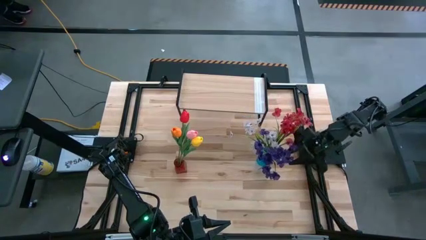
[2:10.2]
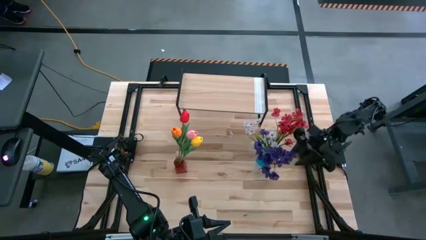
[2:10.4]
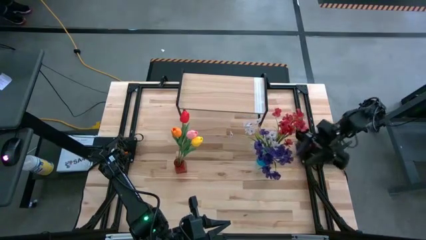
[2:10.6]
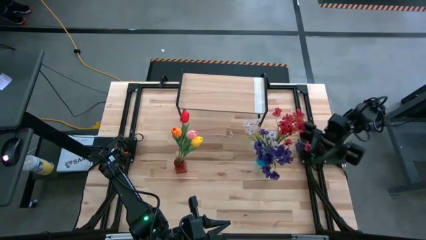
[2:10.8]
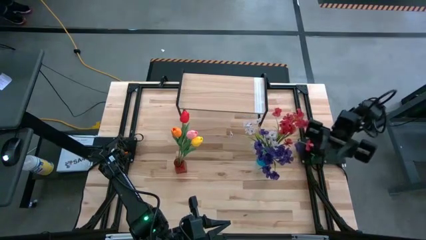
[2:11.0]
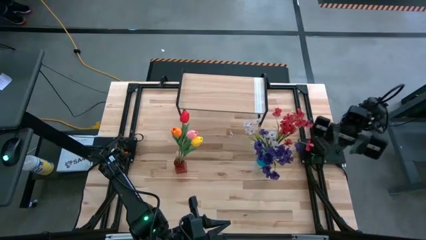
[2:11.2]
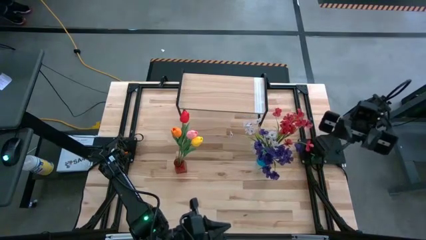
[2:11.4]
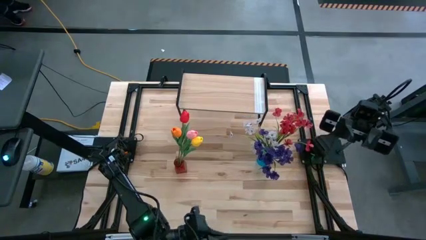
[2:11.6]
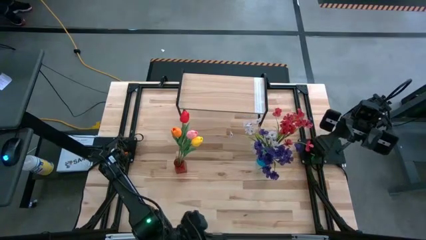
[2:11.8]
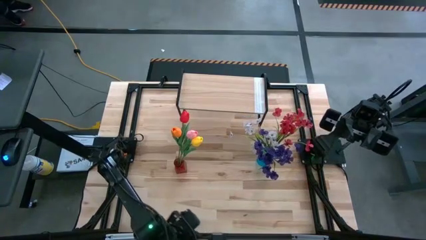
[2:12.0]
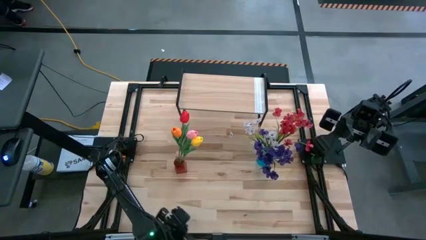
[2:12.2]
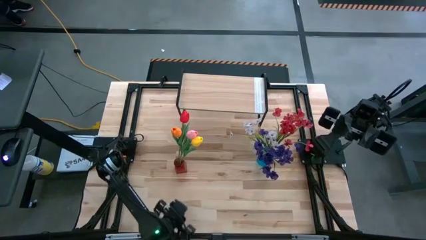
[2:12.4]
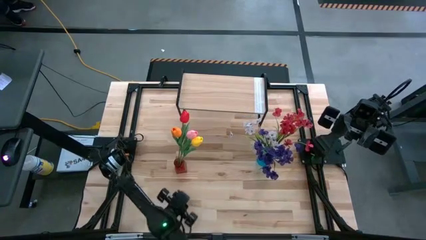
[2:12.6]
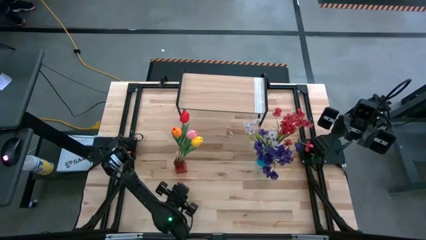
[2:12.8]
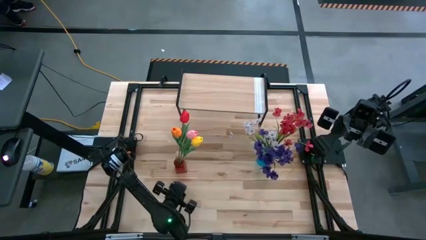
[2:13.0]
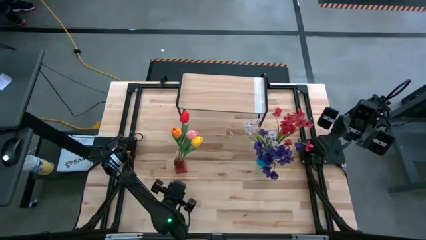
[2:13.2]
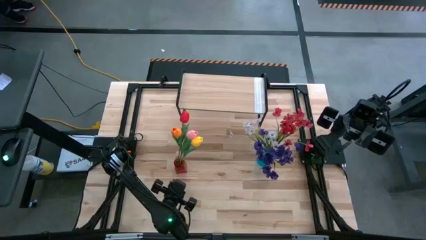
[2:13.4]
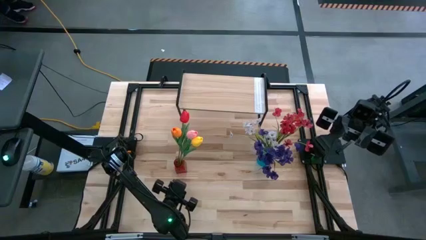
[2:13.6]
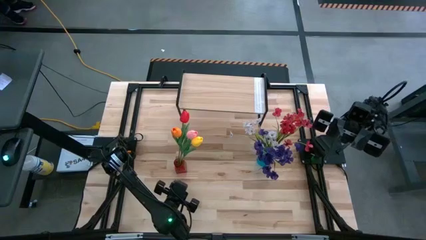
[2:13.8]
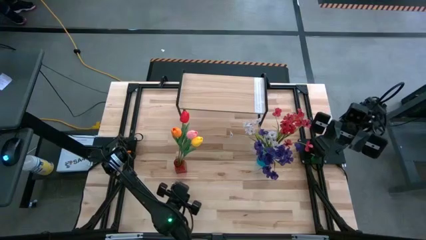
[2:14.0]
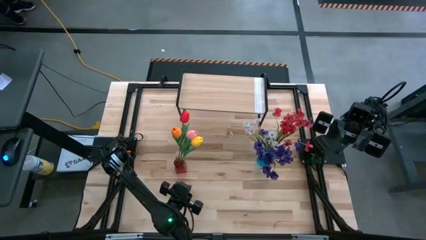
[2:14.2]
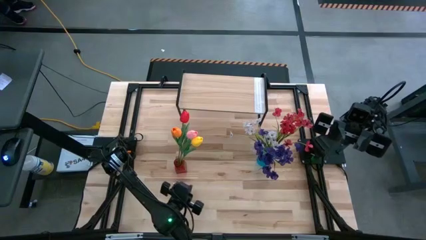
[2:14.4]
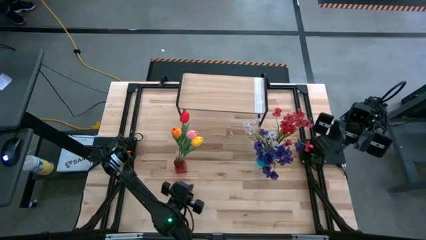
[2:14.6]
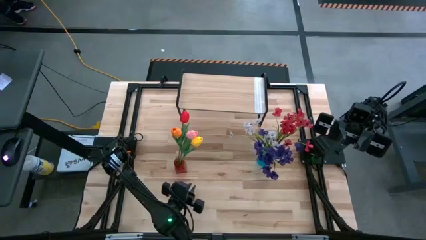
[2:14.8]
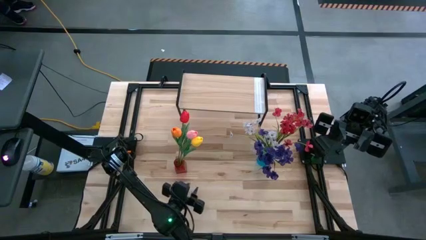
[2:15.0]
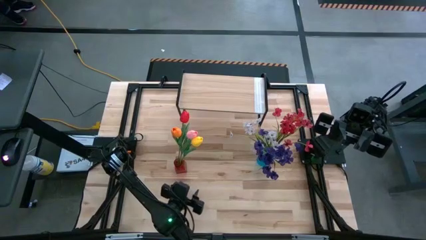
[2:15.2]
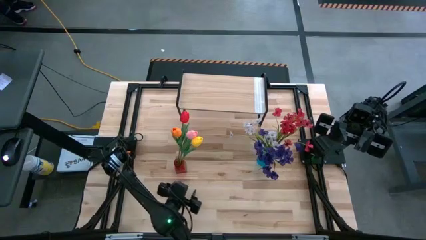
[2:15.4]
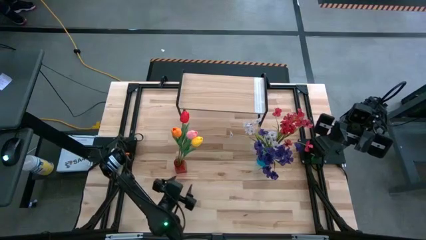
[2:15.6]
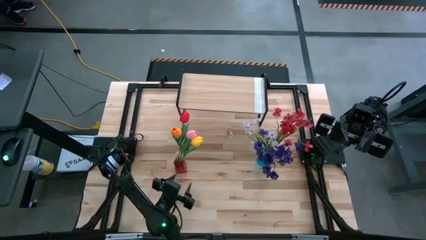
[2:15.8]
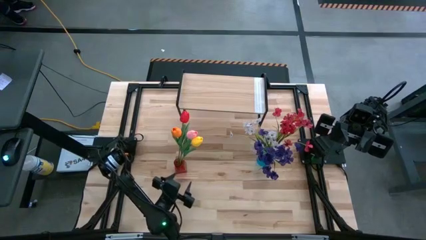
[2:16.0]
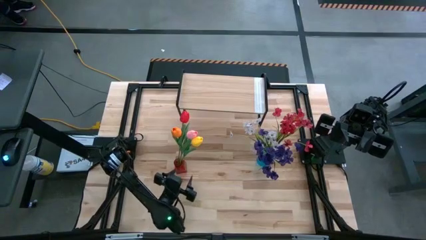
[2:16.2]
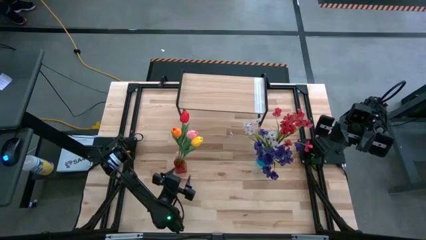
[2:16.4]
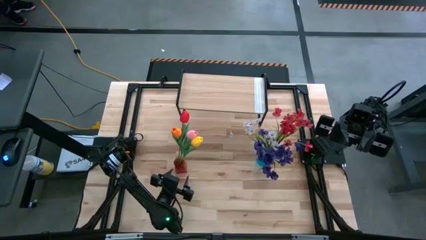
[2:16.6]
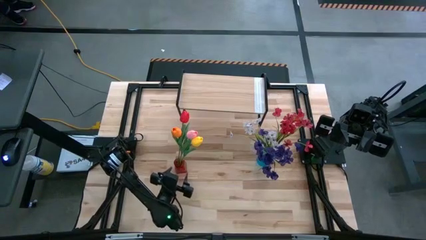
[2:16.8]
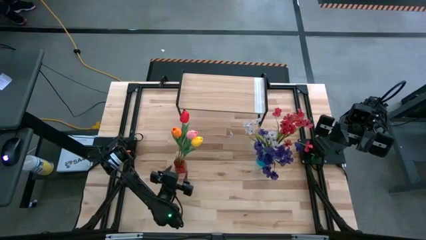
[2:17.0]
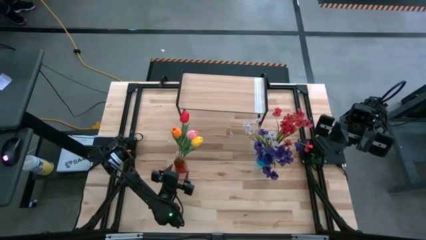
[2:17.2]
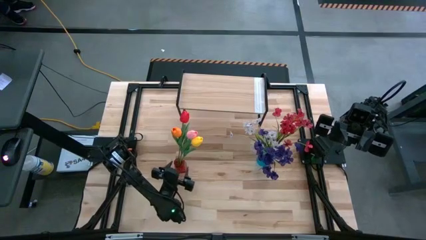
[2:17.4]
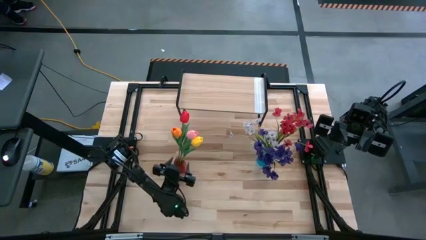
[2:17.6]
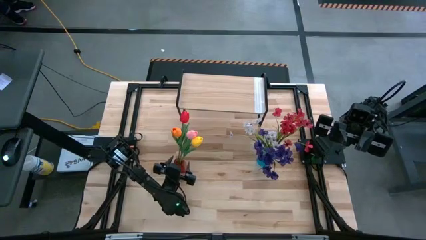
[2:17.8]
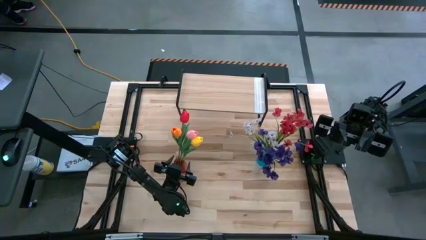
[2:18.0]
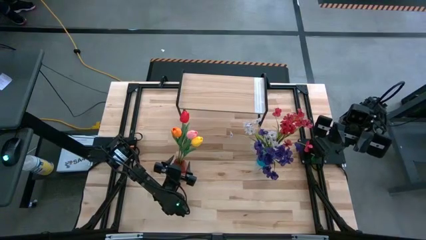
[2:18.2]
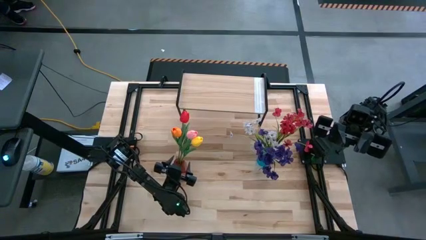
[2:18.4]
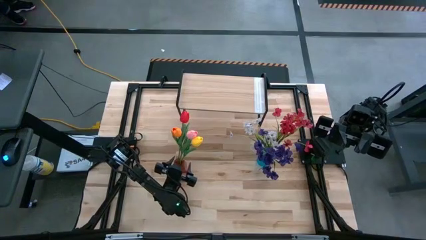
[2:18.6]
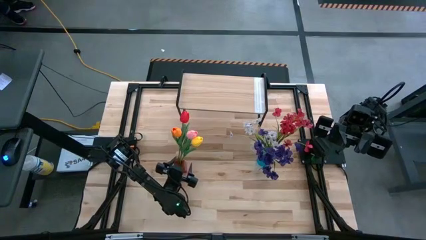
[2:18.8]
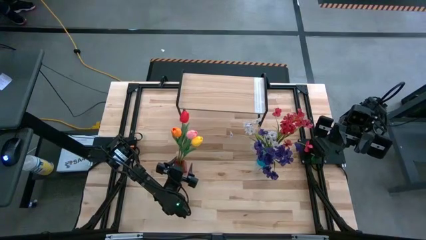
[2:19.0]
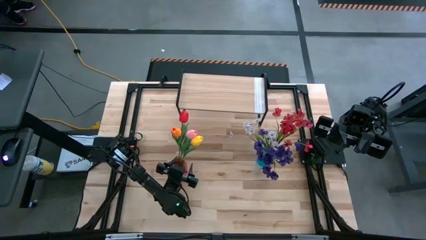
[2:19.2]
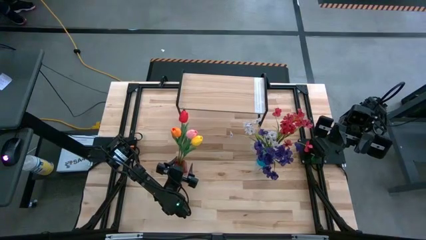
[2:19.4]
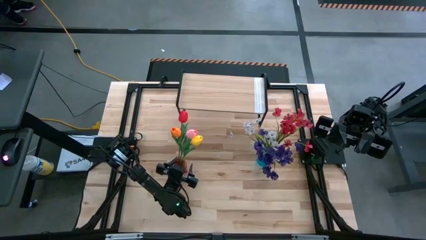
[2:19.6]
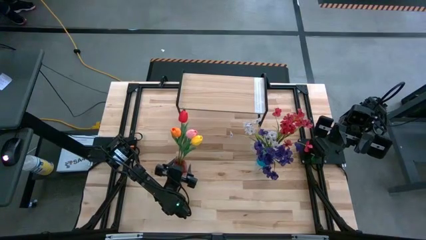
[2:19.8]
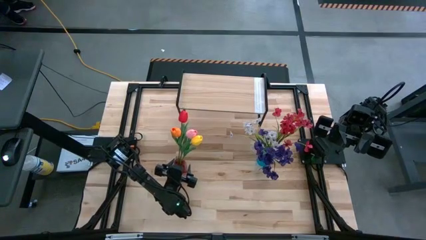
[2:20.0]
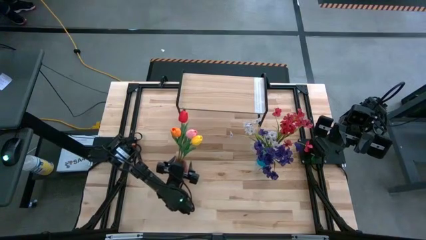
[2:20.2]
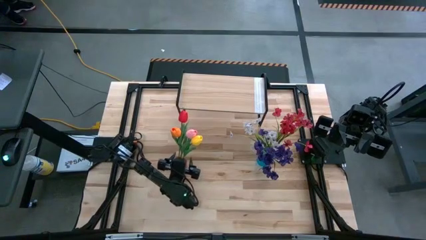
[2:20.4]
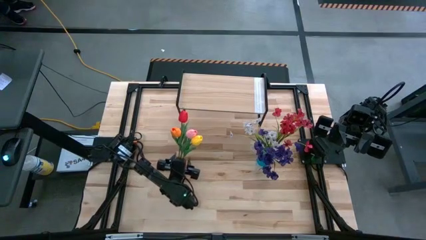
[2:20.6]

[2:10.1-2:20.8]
Task: Pick and place flowers into a vace then onto a shelf
Put the red vase with flowers on the shelf

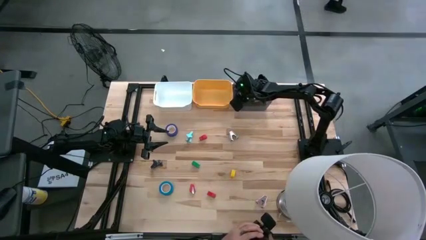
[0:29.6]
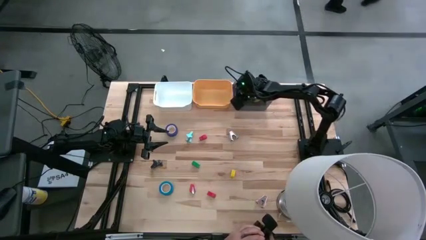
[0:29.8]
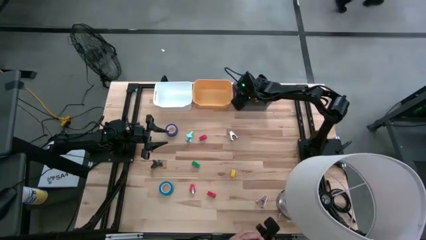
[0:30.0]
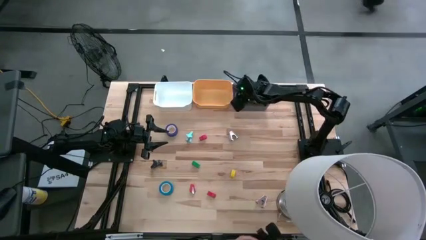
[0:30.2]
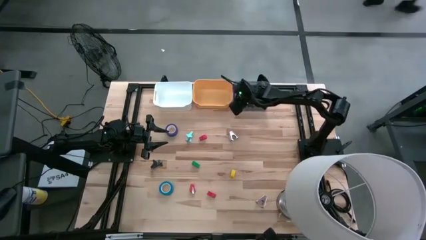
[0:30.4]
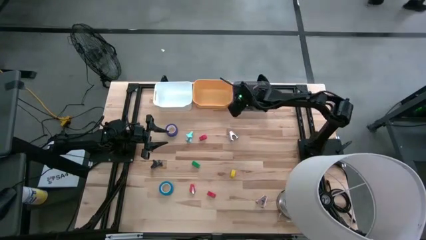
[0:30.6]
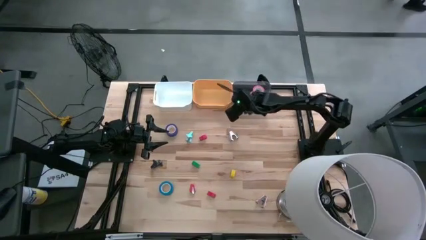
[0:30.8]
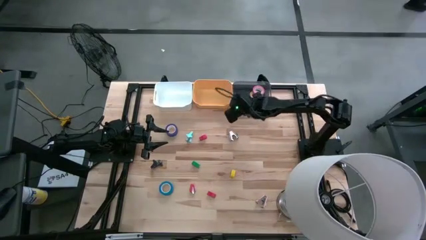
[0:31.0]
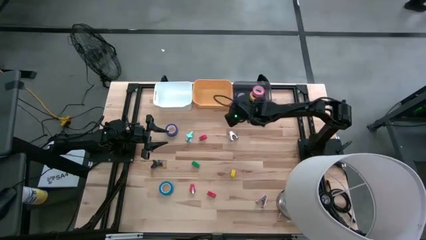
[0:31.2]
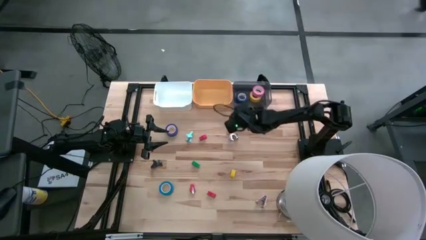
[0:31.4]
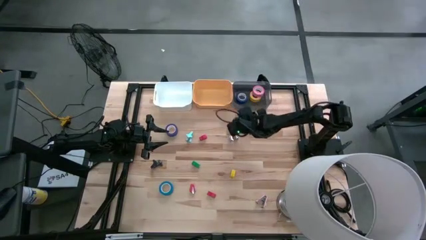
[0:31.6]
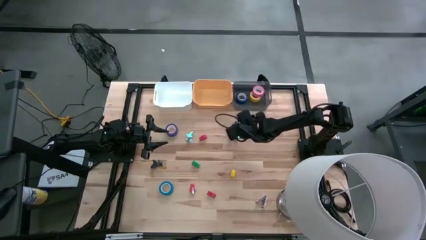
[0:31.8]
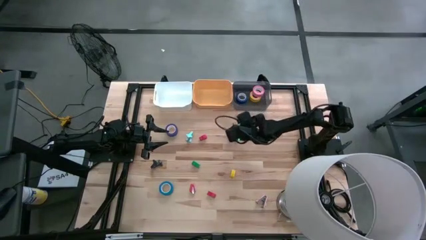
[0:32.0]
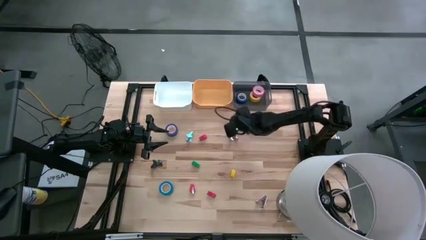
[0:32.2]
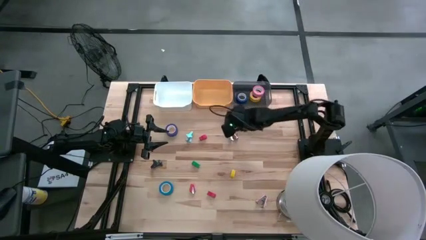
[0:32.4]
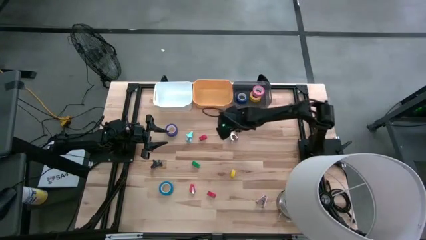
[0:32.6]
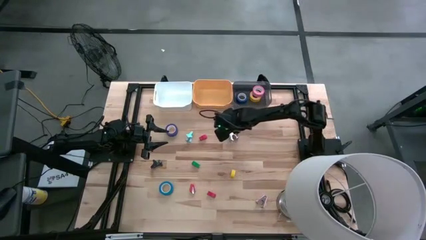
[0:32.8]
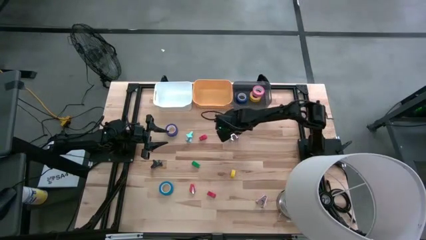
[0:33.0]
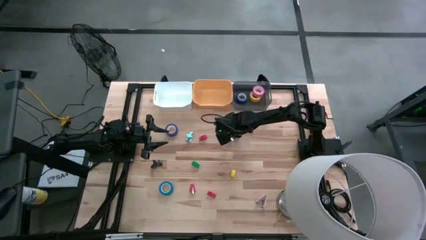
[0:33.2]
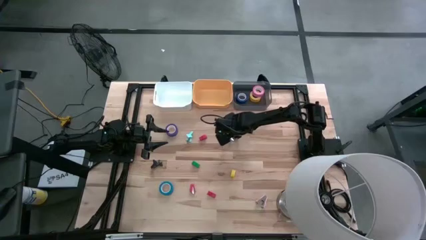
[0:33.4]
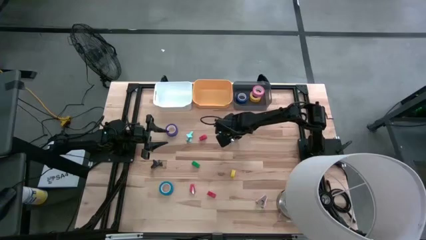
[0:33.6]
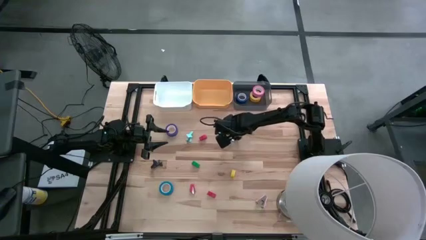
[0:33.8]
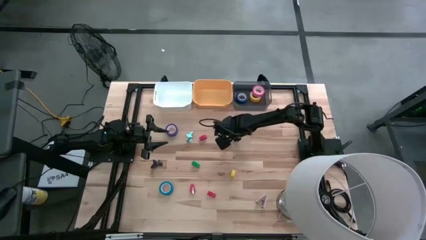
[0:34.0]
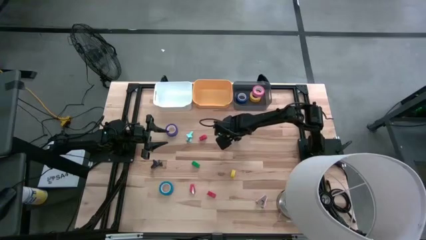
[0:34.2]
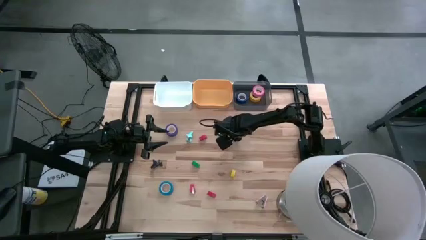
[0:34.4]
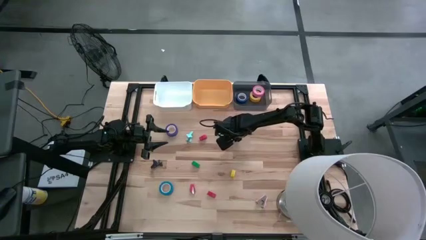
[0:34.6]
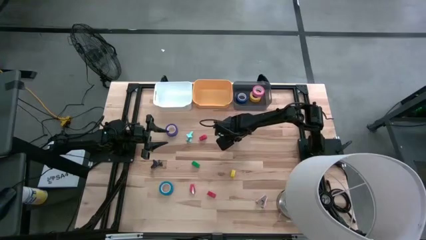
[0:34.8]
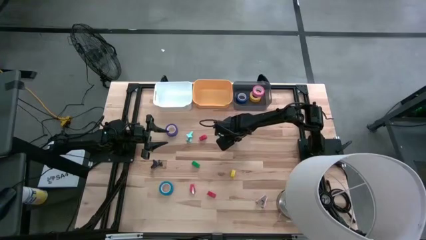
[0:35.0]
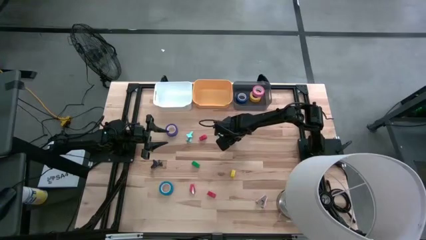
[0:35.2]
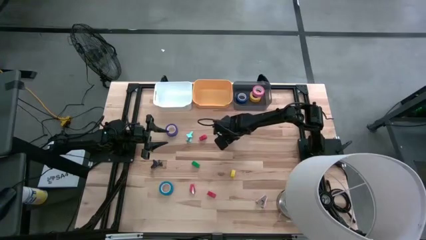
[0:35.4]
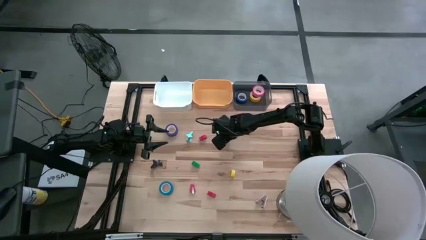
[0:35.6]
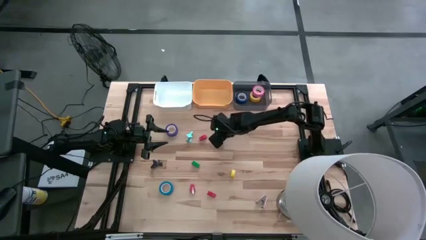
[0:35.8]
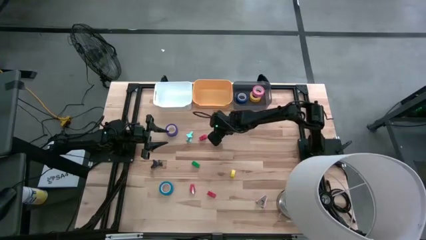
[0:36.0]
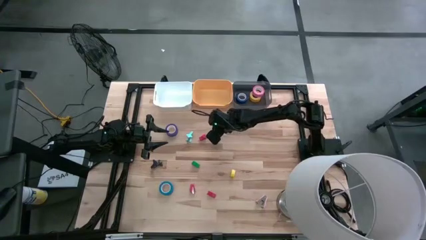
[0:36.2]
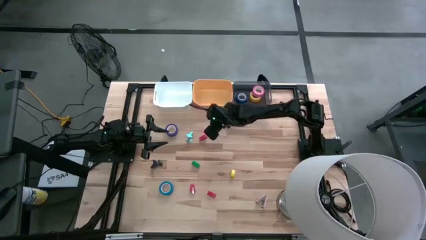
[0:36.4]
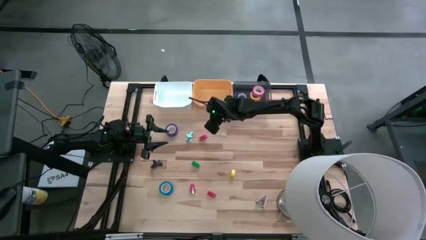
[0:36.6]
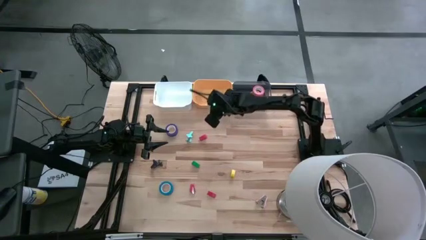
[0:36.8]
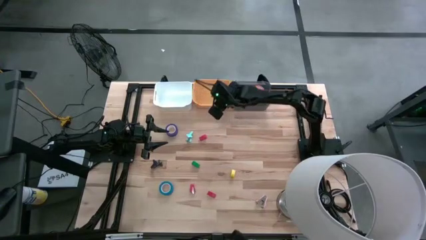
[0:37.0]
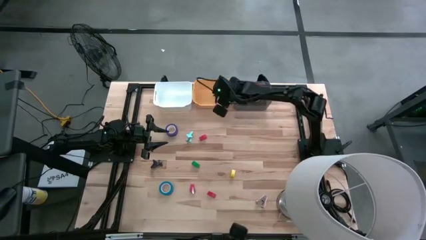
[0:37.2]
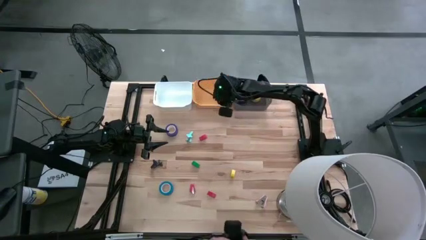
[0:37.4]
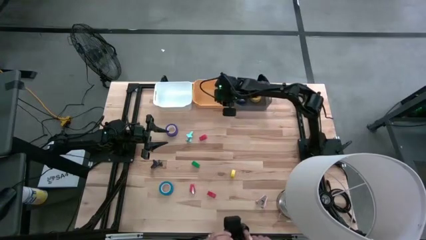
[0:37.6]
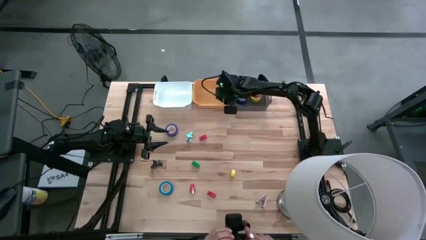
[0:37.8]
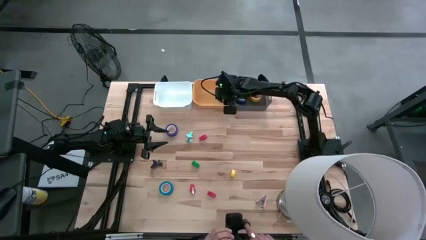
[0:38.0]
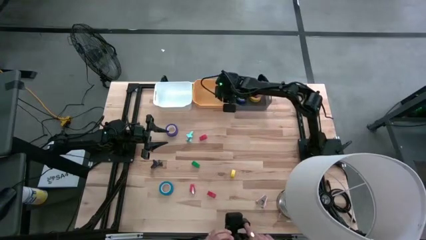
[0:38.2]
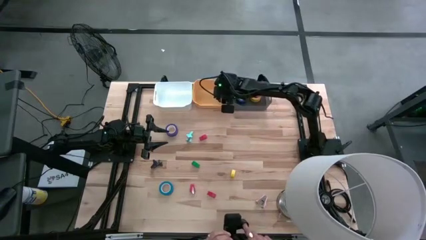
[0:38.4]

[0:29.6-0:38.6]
Task: Pick and place Stapler, Stapler remover, tape
Put the white staple remover into the orange bin
